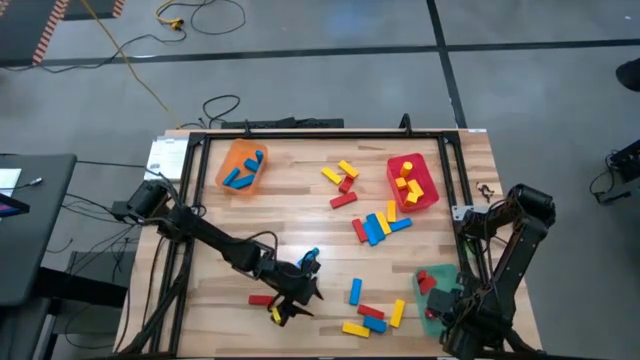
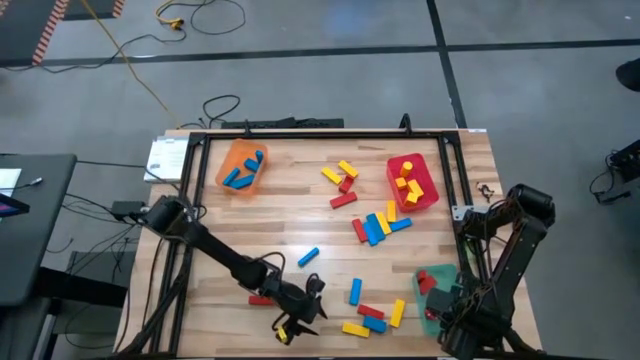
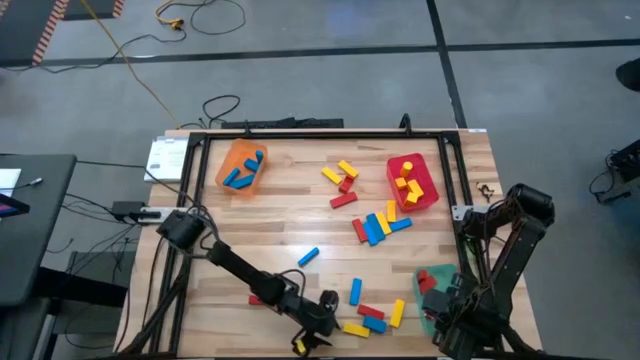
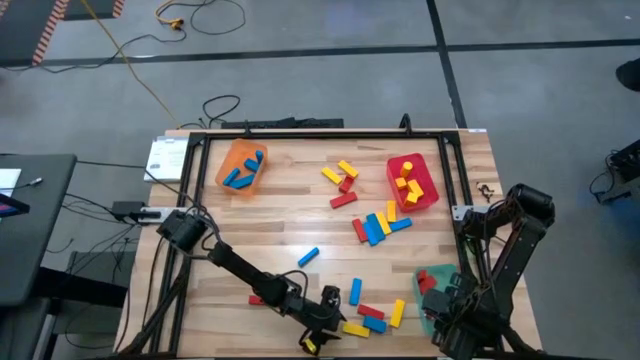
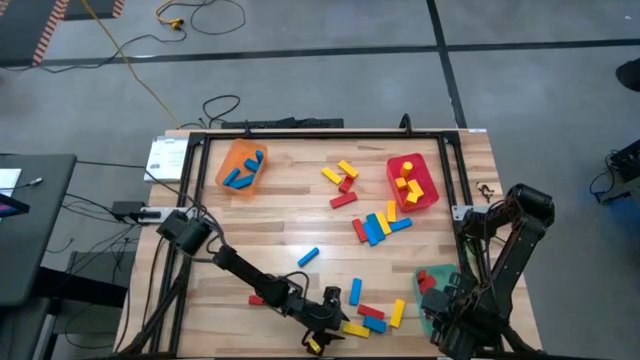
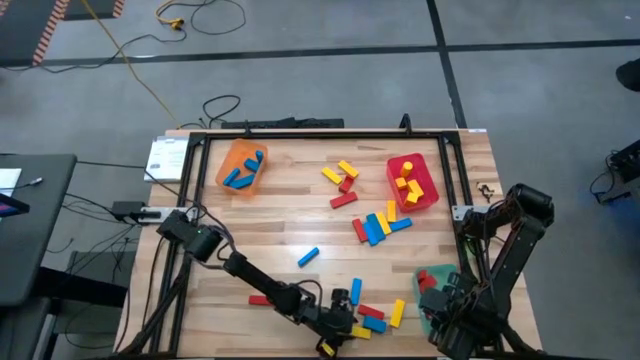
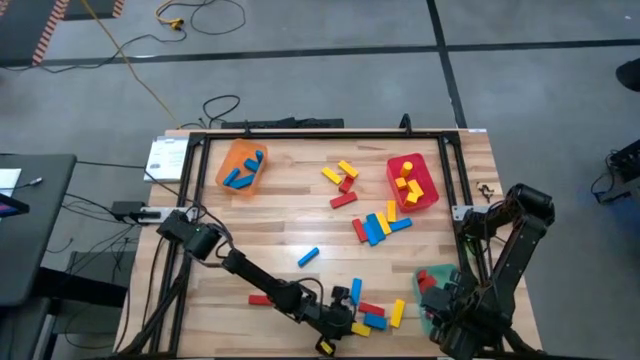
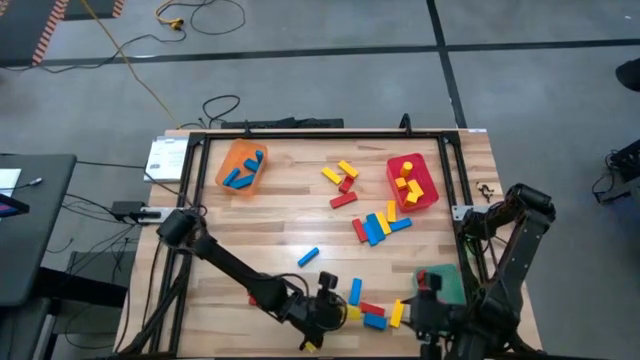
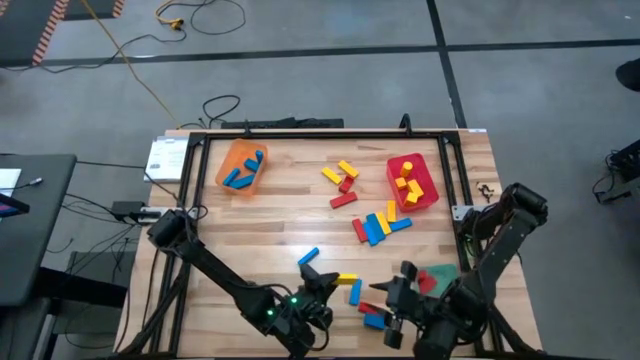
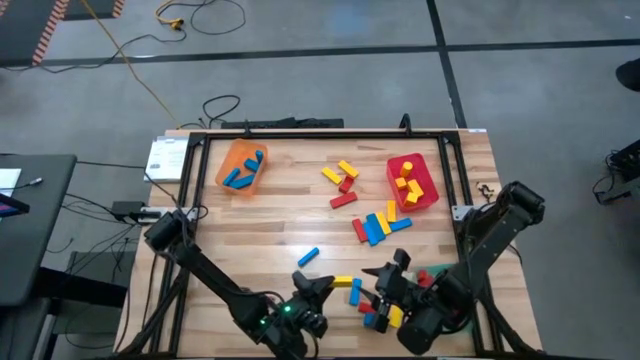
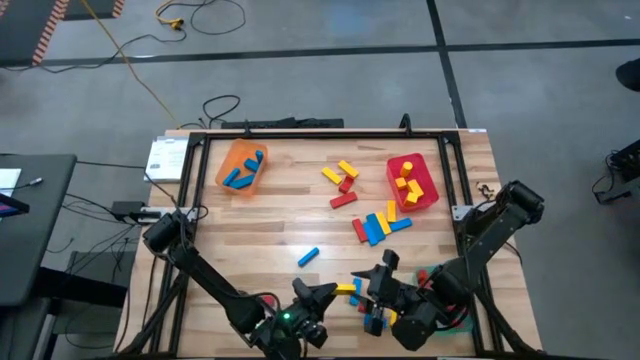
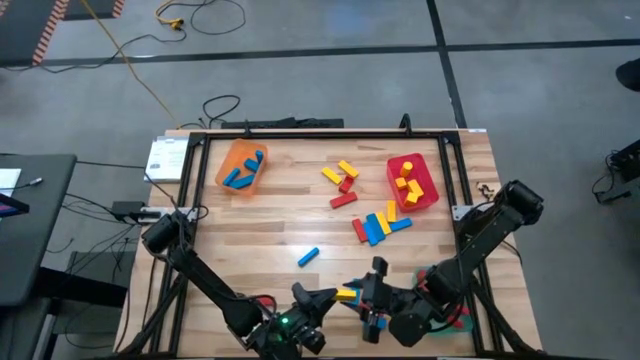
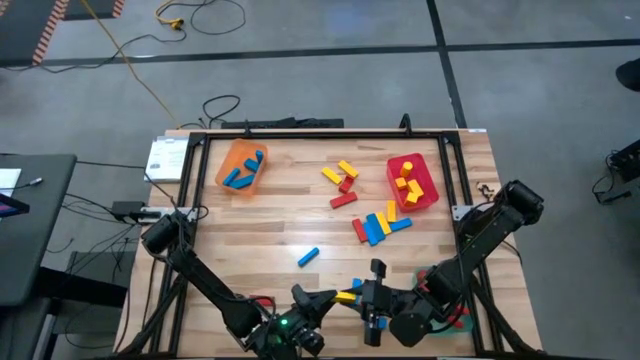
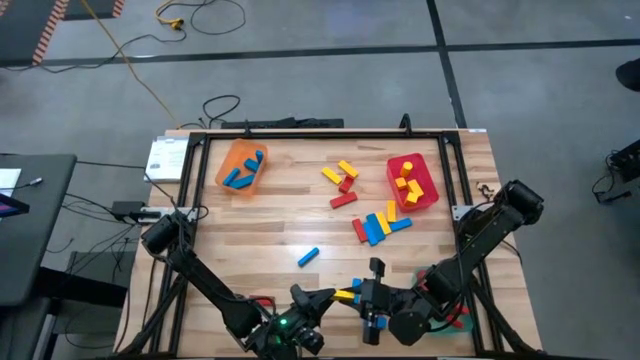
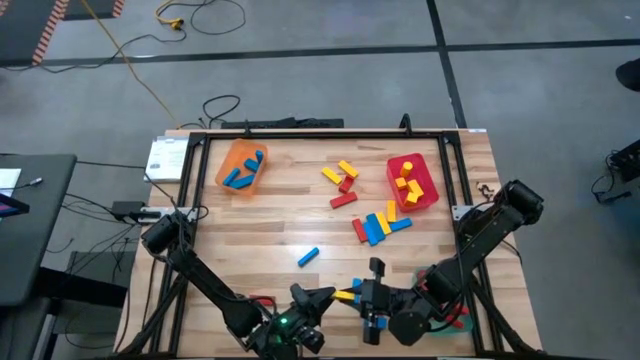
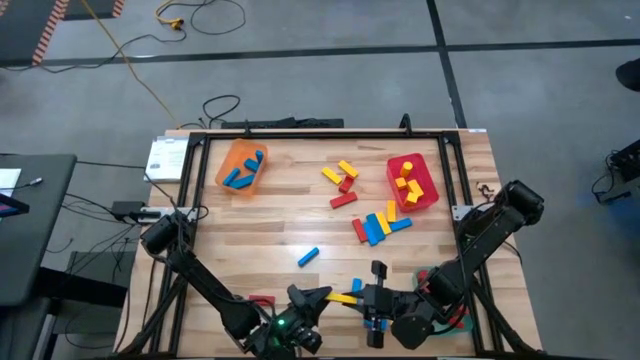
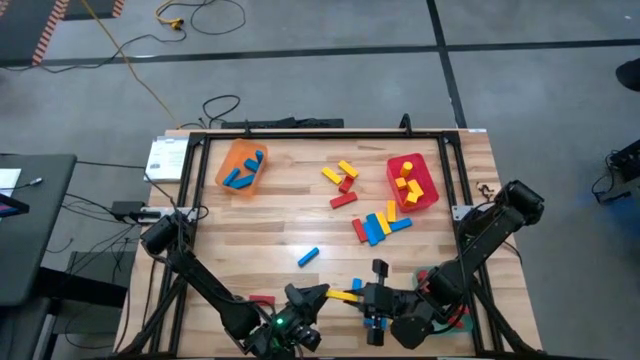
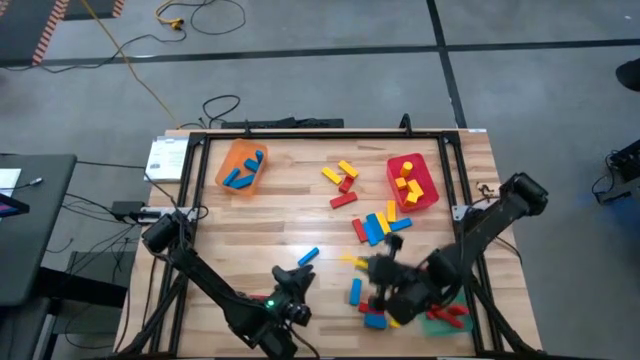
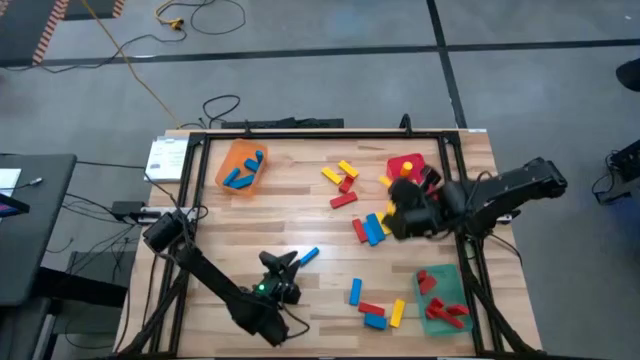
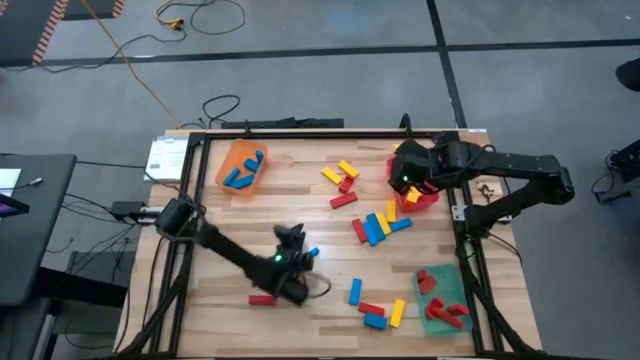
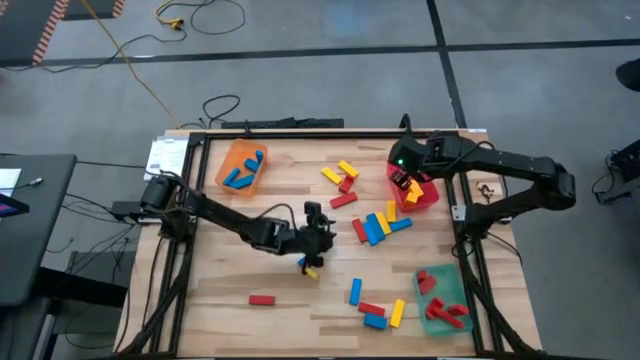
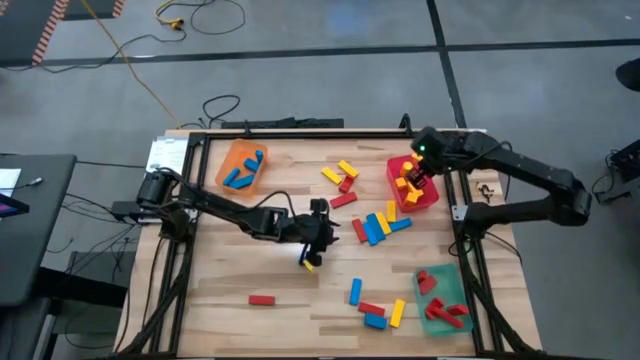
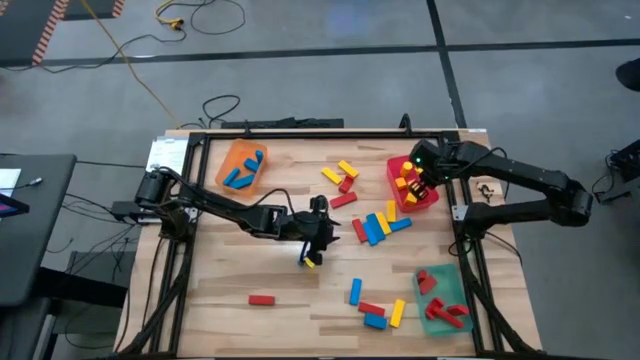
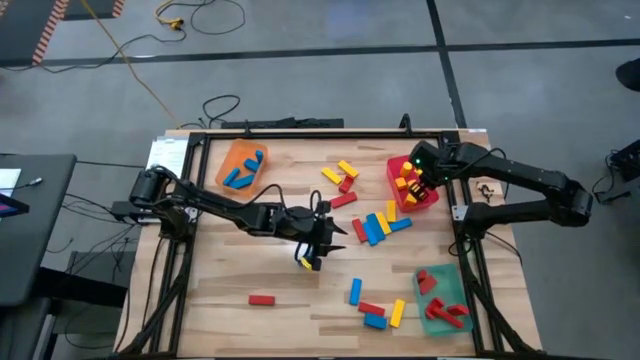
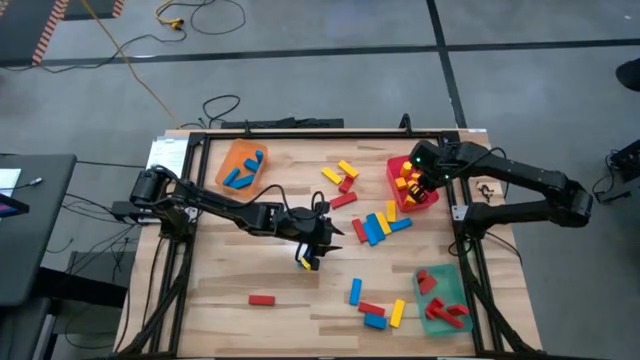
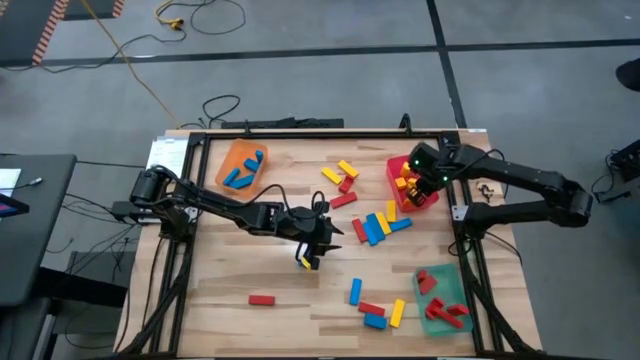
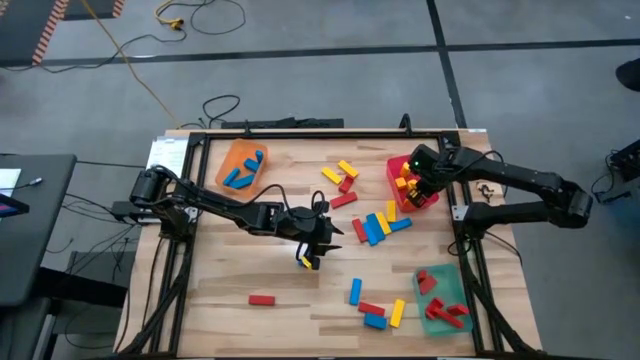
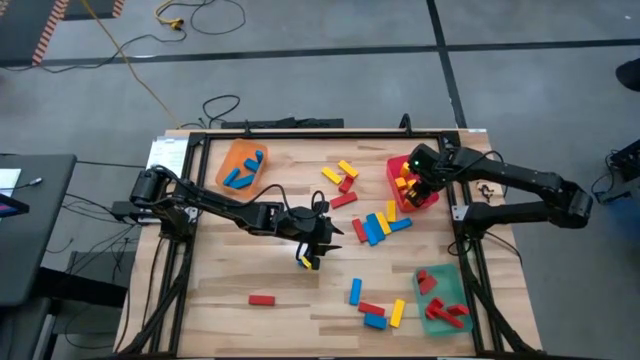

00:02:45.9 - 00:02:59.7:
Task: Sort blocks
Put the yellow rectangle block into the red bin

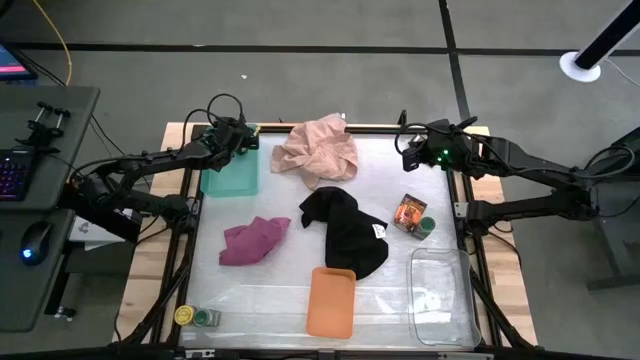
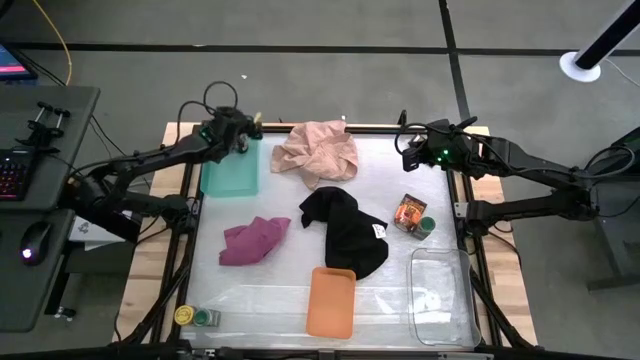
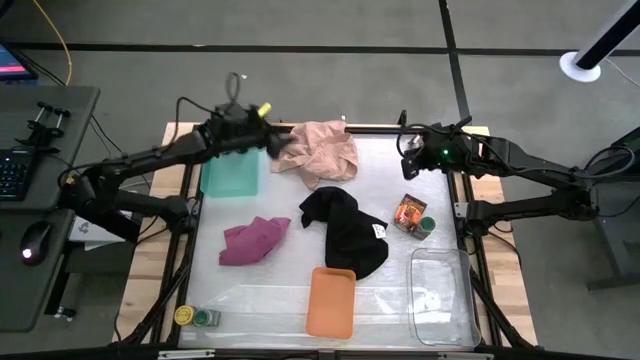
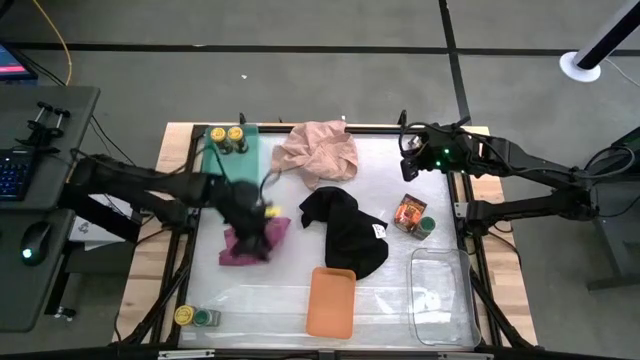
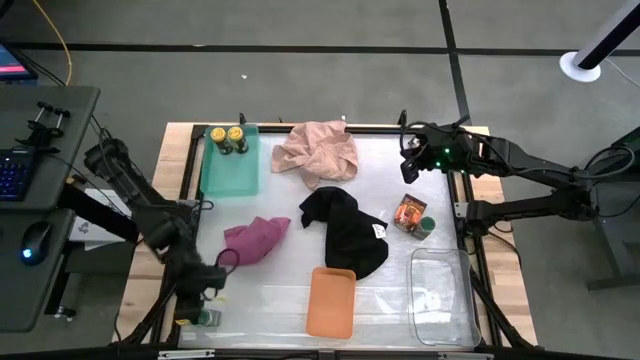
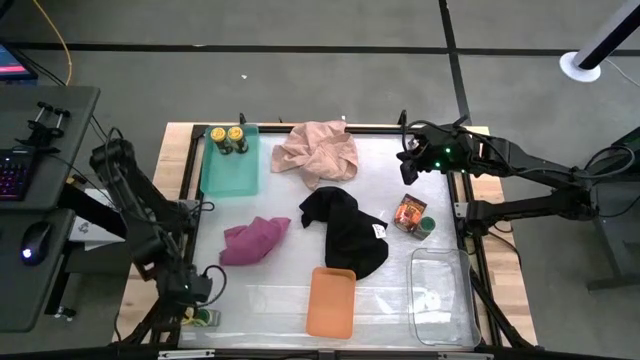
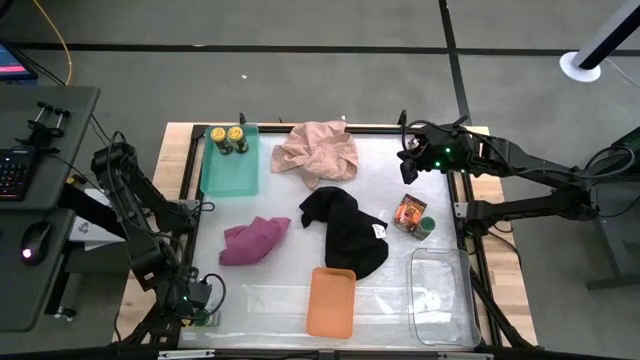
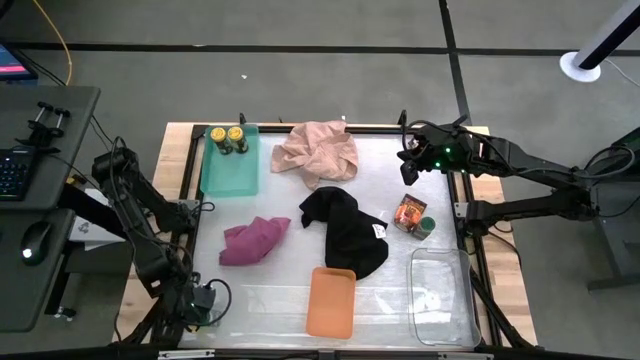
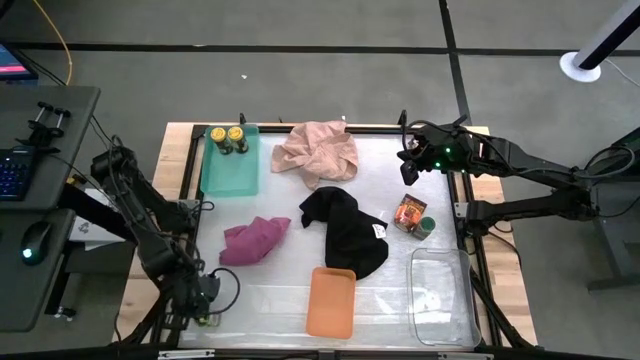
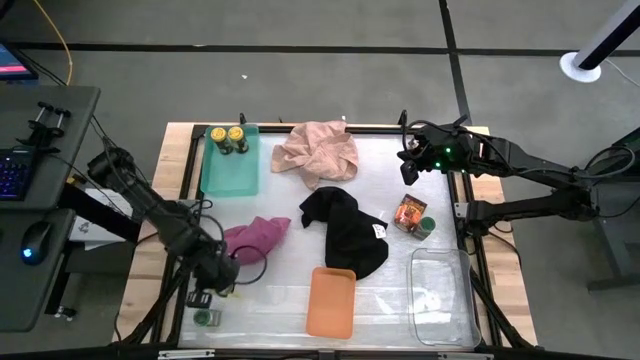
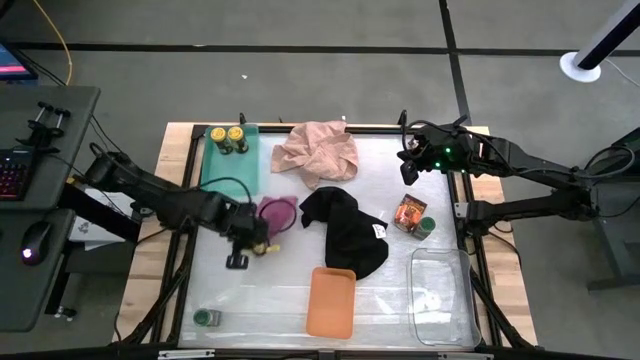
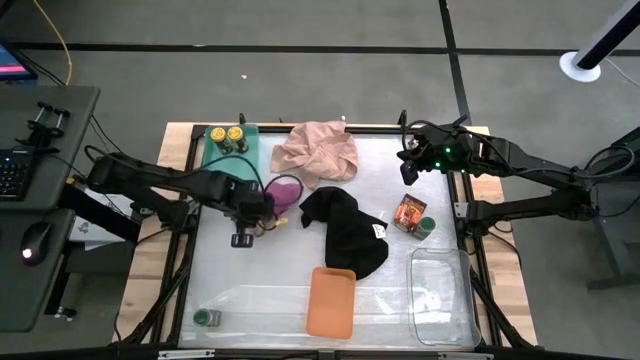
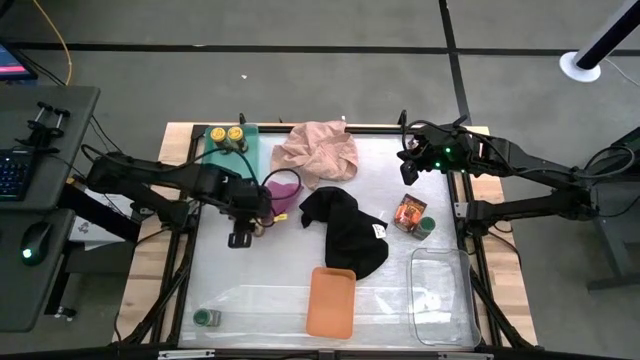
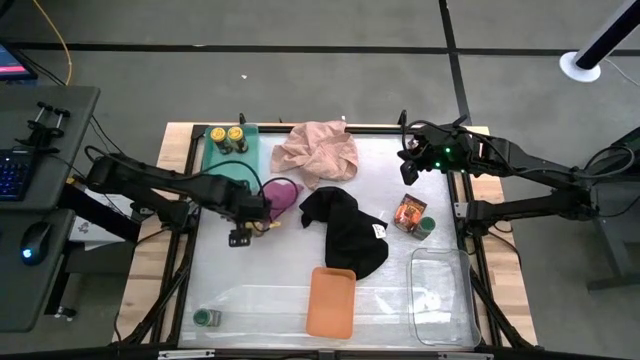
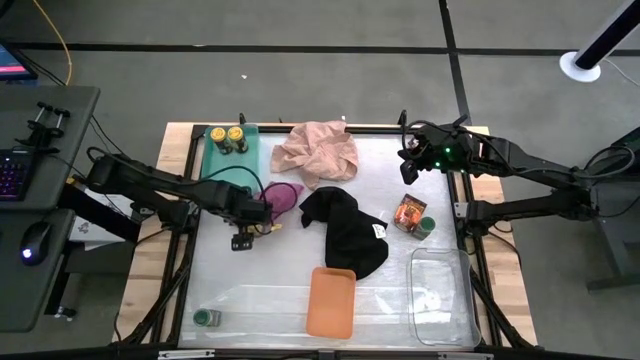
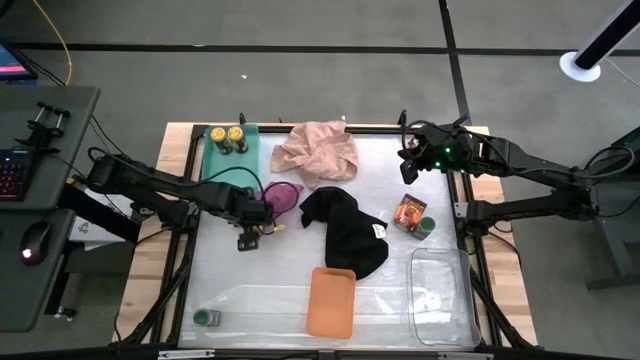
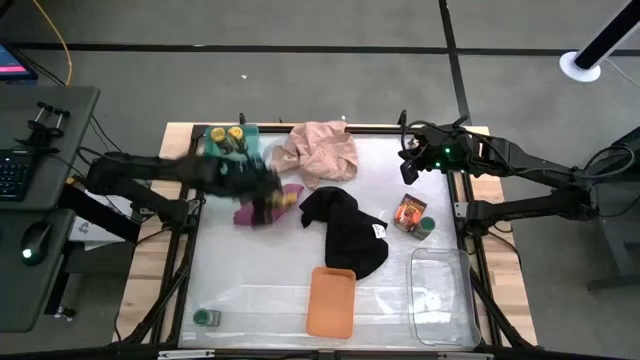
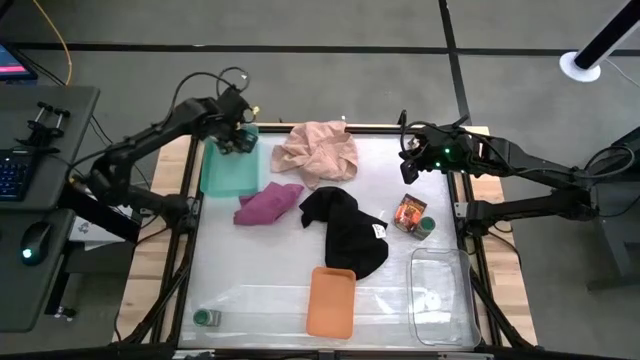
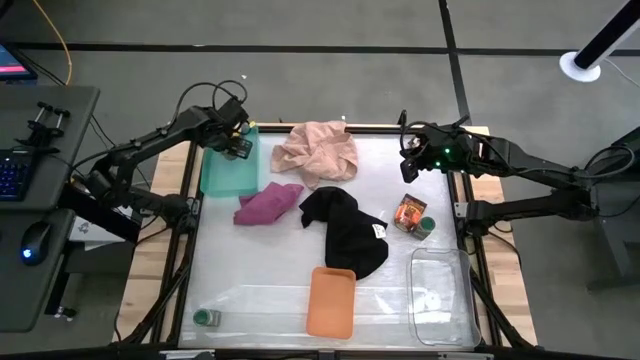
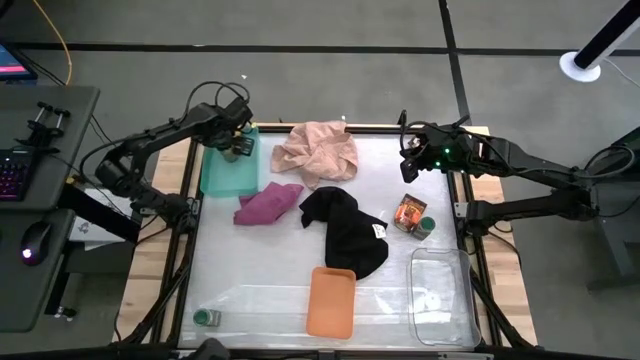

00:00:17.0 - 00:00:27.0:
Task: Sort spices by type
Put the yellow seasoning bottle into the green bin
